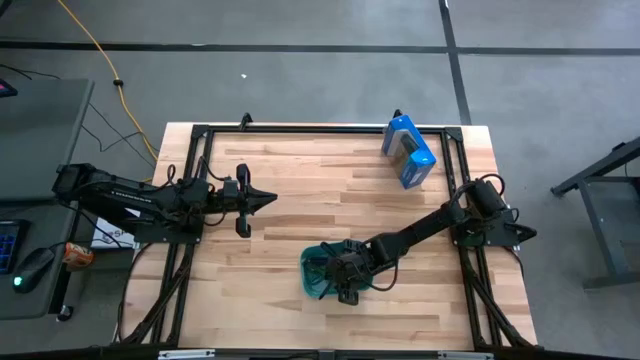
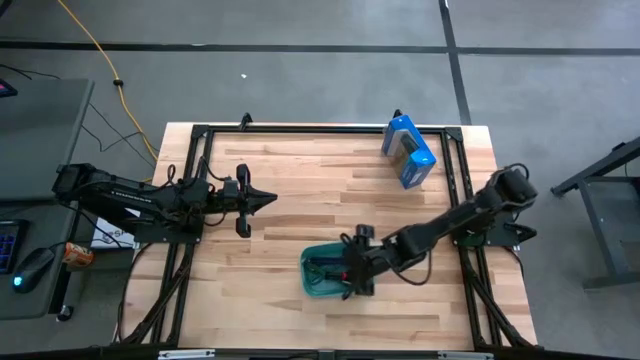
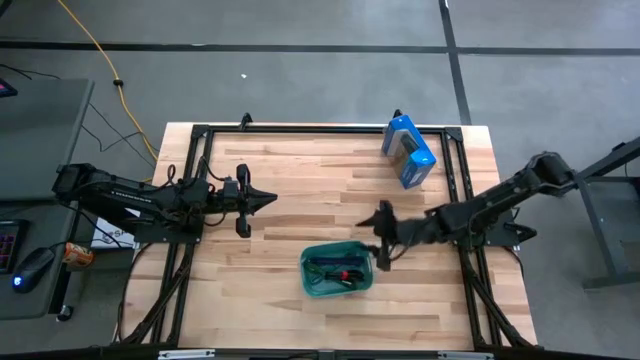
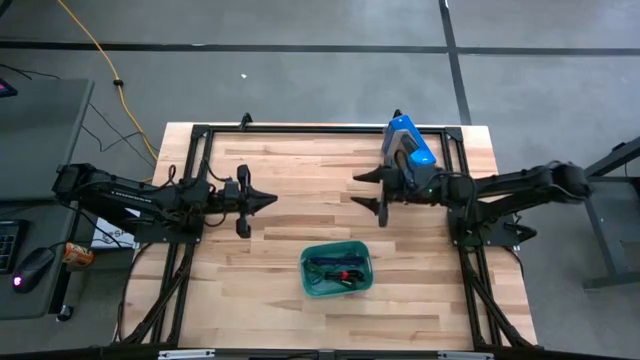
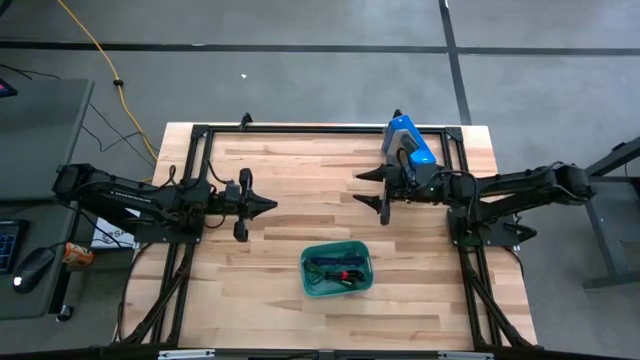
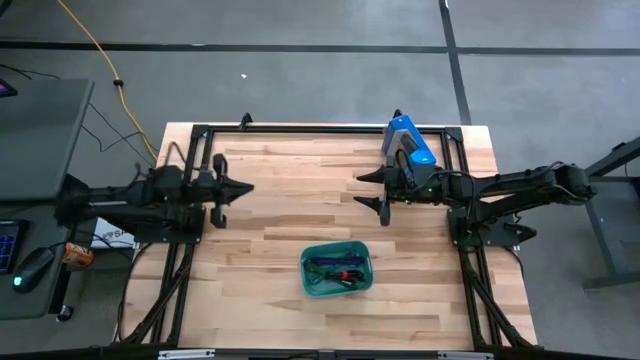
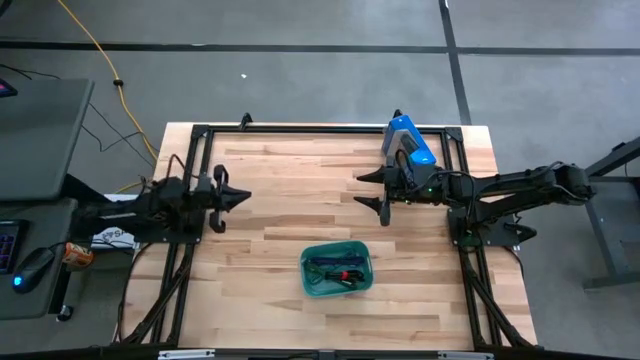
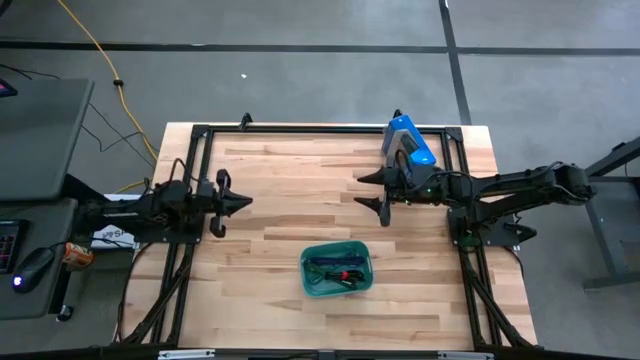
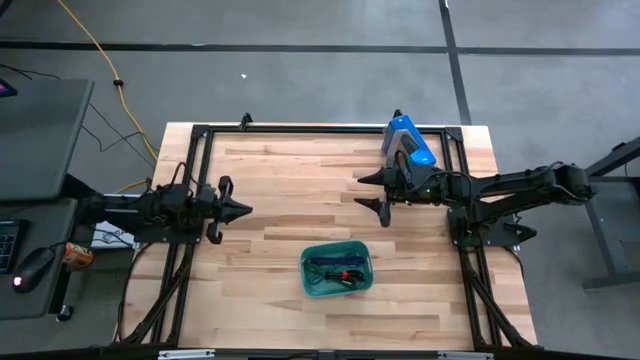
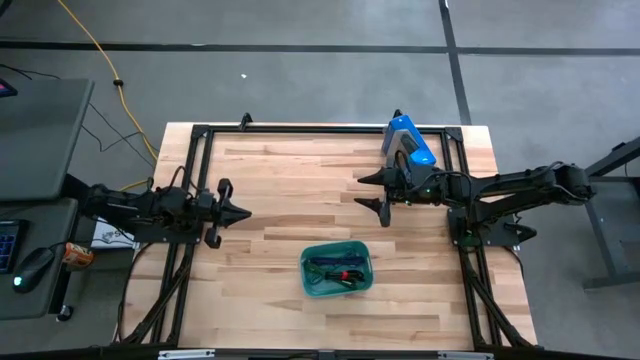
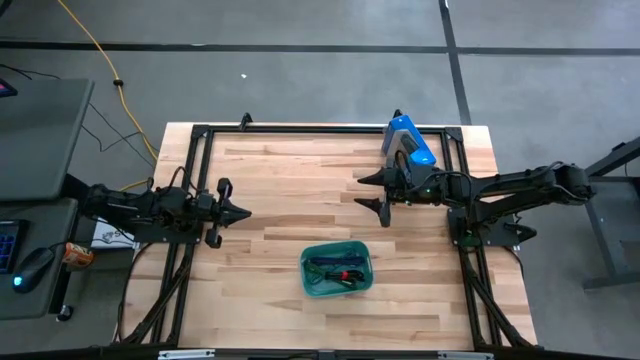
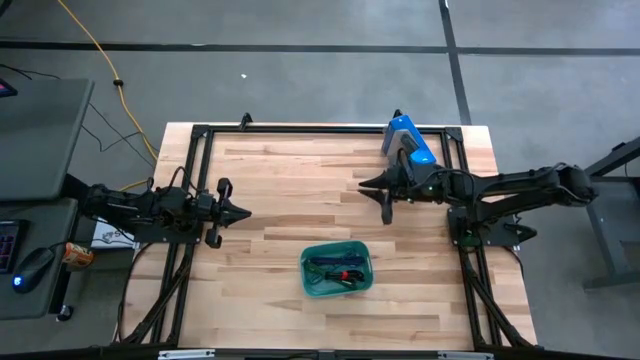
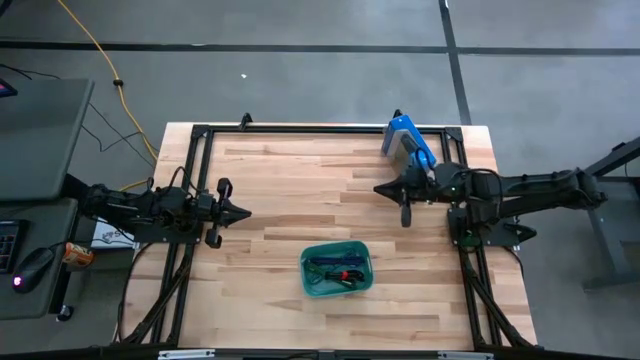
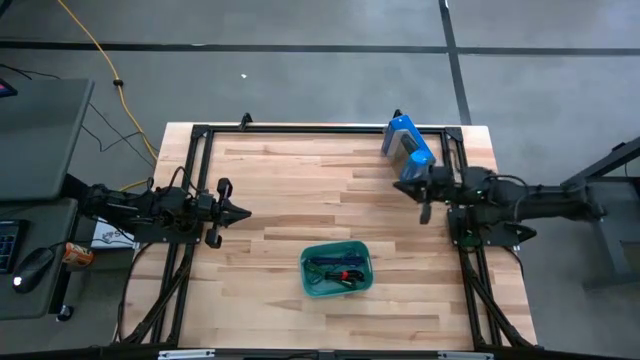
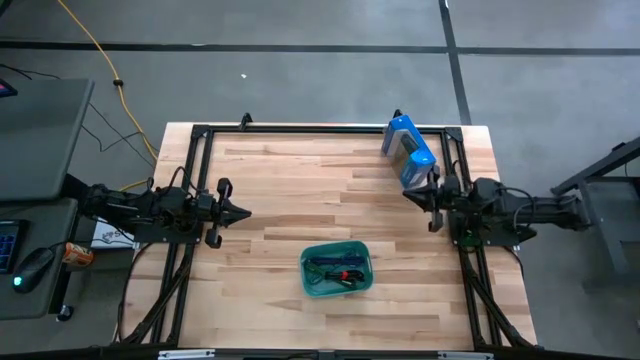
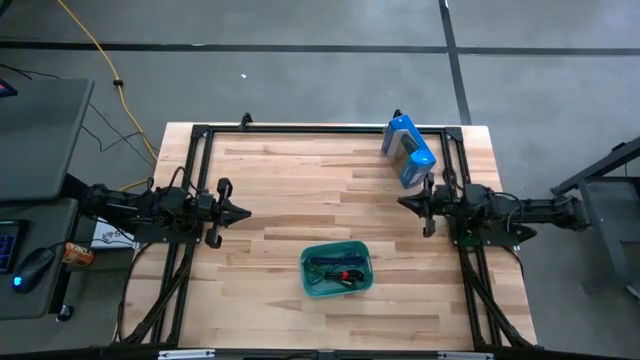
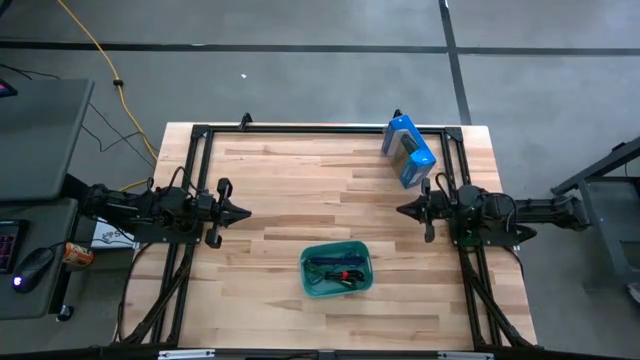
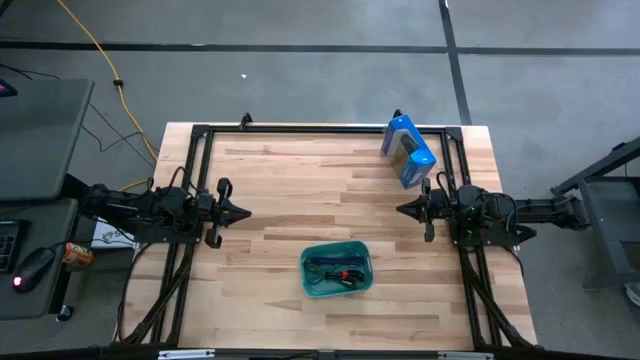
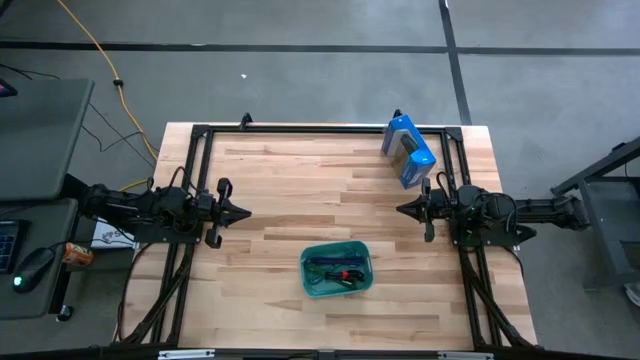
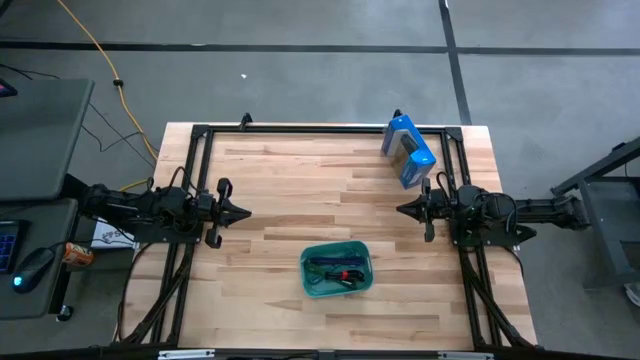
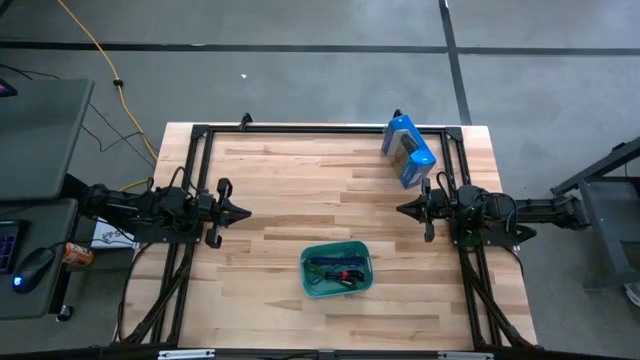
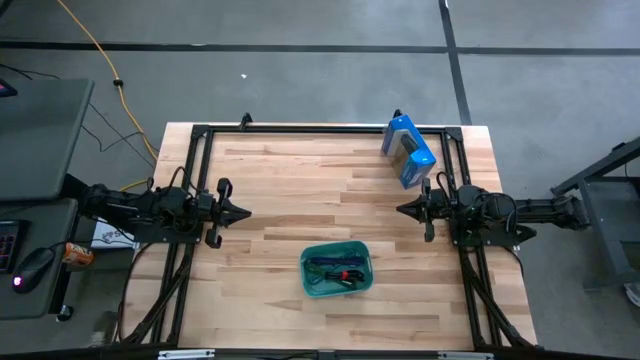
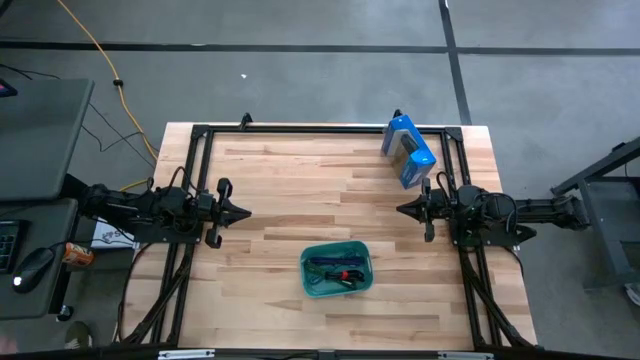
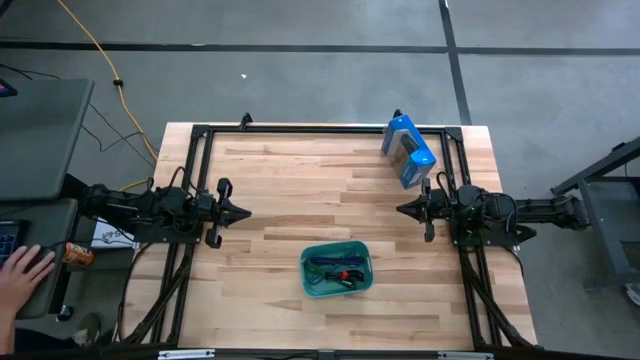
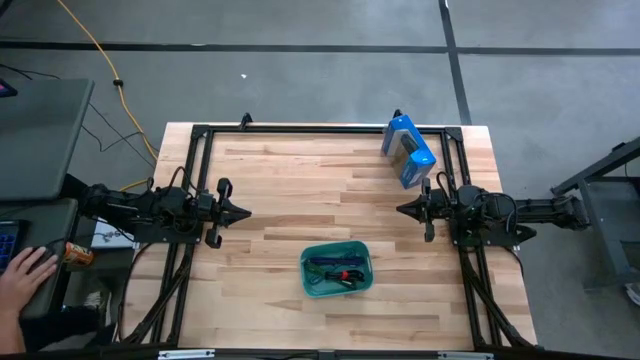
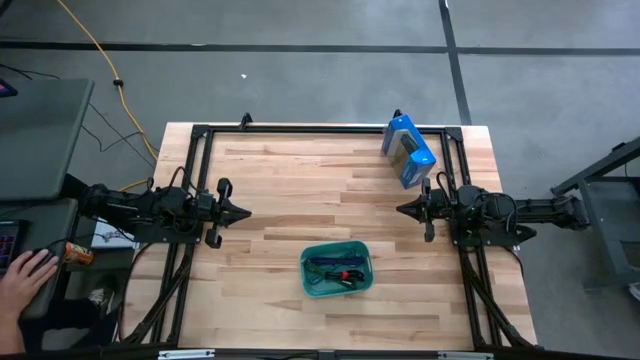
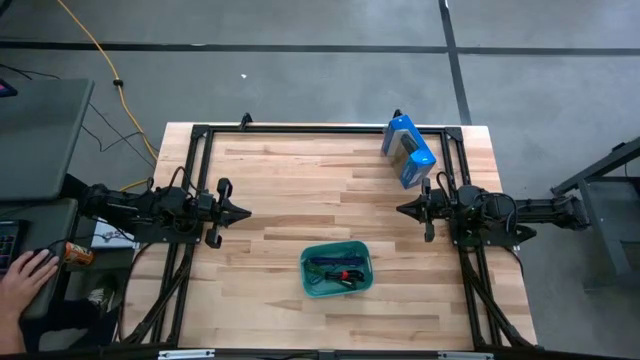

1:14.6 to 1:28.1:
Task: Pick and place USB-C Cables
Return to Home Position

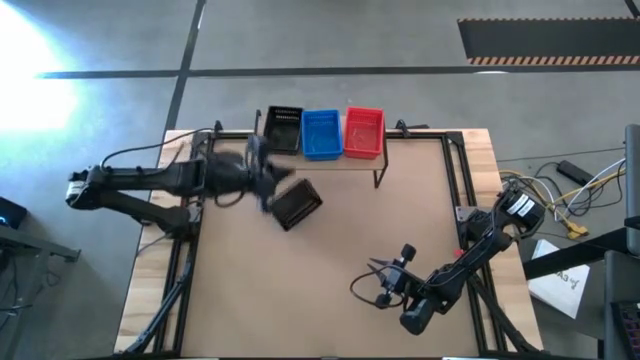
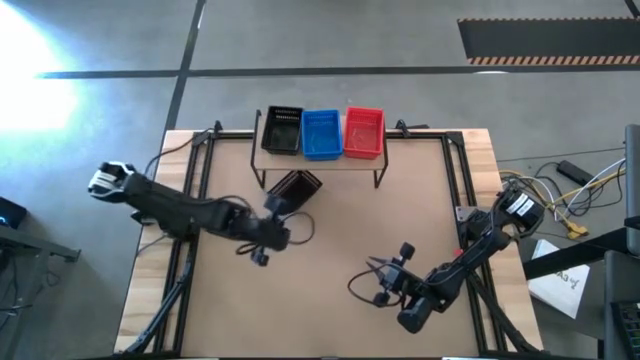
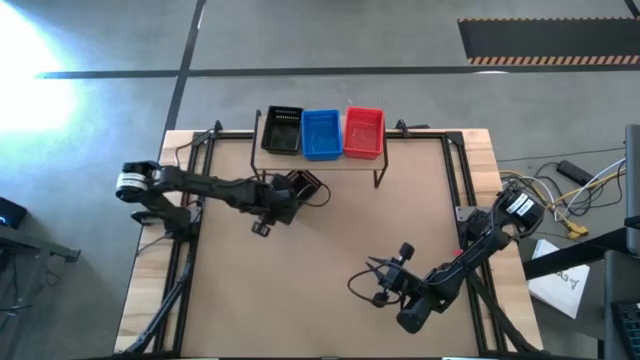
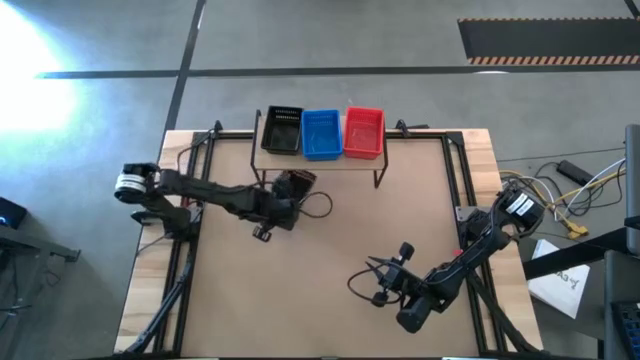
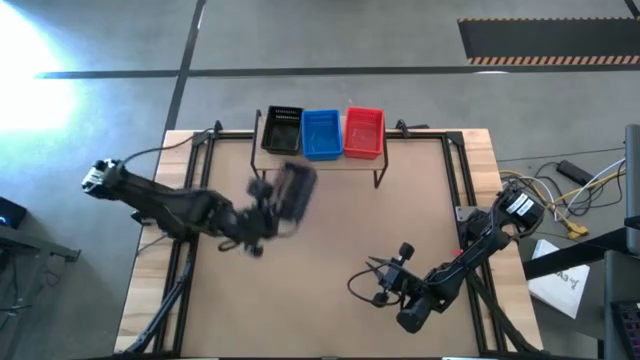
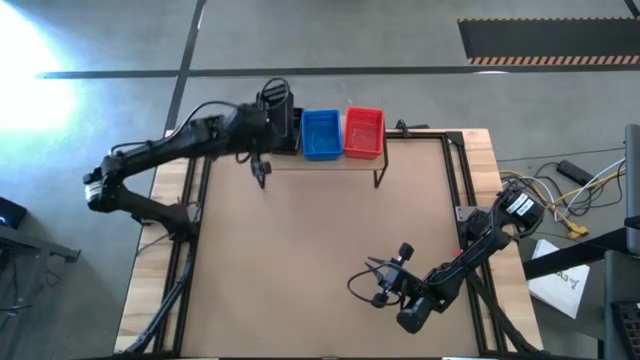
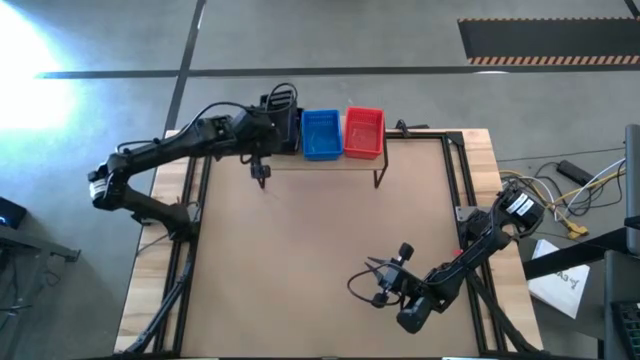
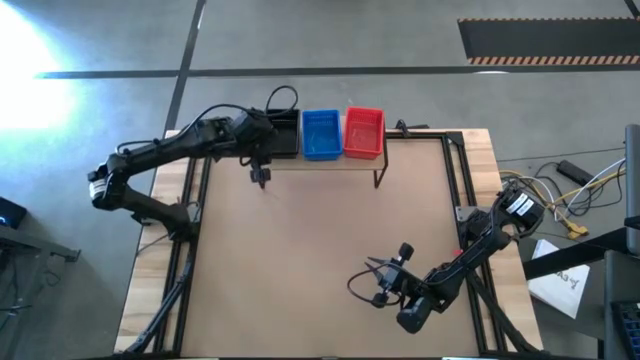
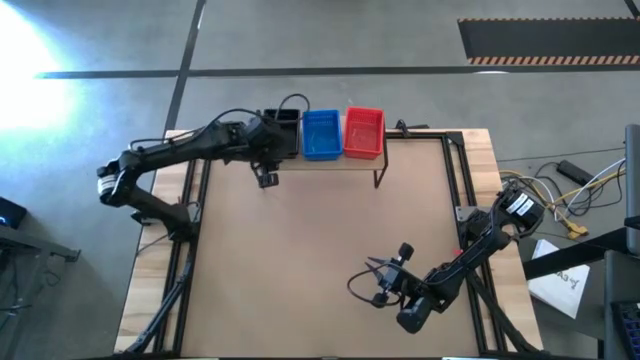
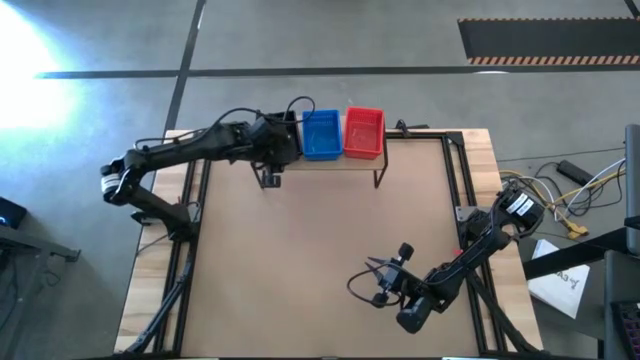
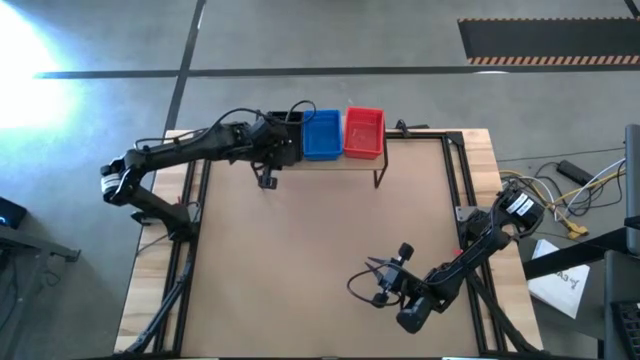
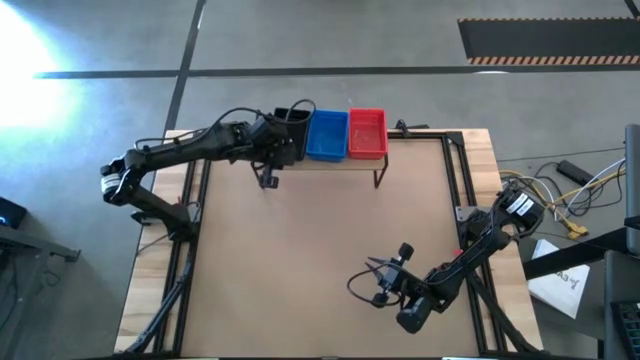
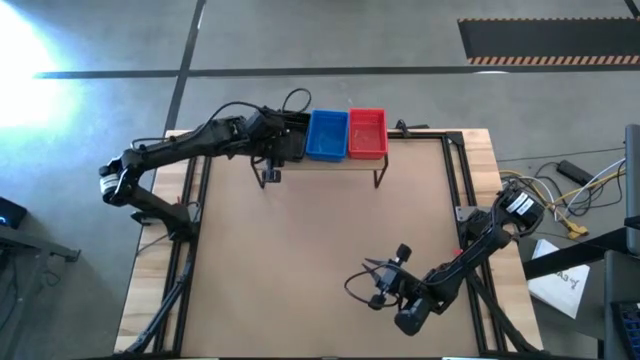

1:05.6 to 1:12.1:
Task: Stack baskets on shelf by color
Stack the black bin on the black bins on the shelf
